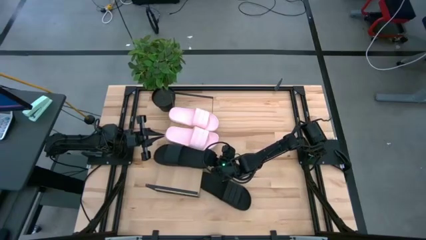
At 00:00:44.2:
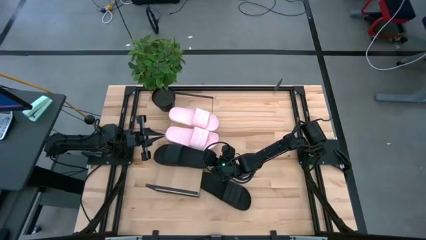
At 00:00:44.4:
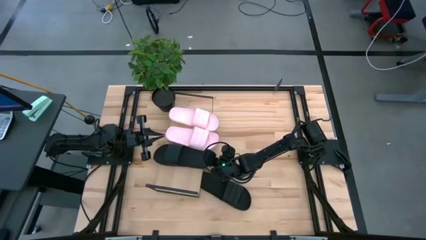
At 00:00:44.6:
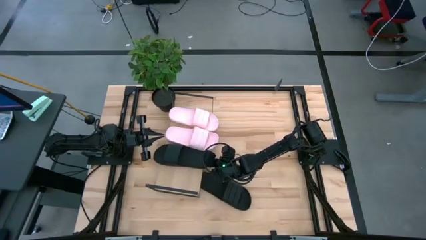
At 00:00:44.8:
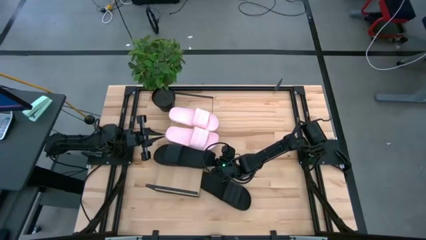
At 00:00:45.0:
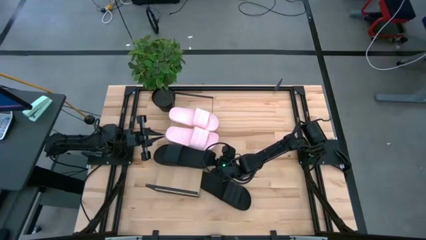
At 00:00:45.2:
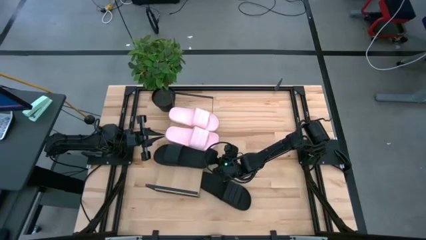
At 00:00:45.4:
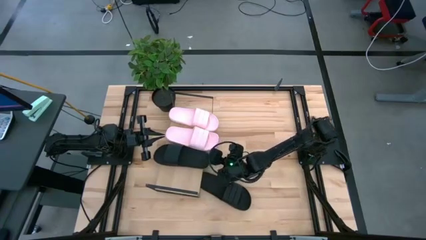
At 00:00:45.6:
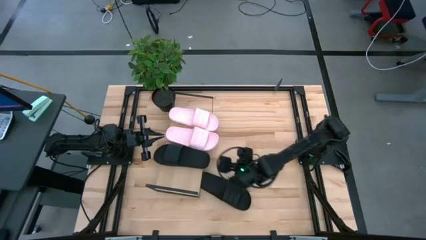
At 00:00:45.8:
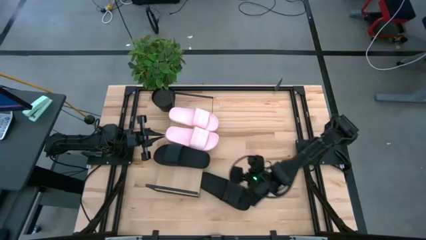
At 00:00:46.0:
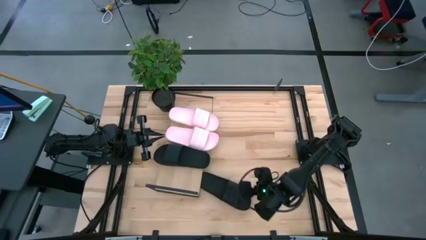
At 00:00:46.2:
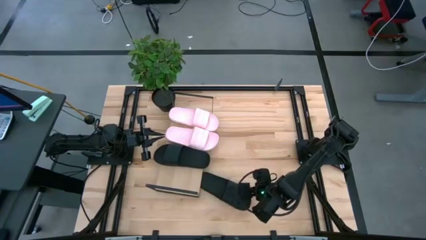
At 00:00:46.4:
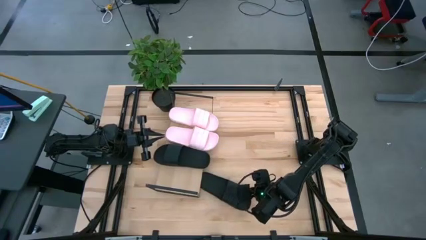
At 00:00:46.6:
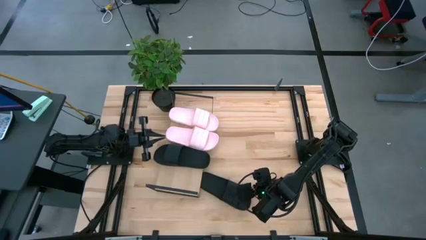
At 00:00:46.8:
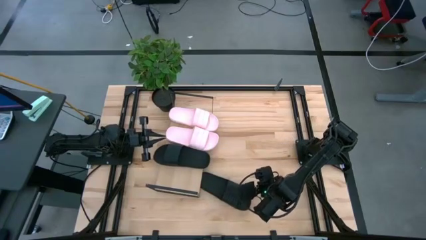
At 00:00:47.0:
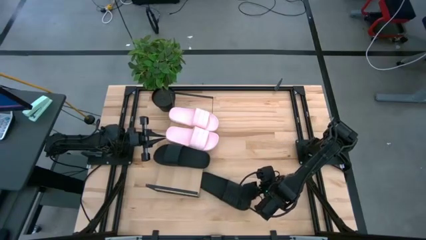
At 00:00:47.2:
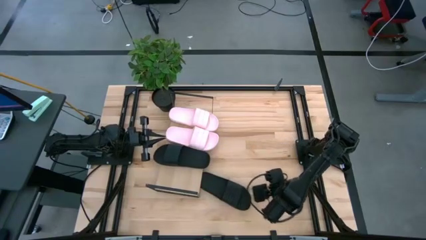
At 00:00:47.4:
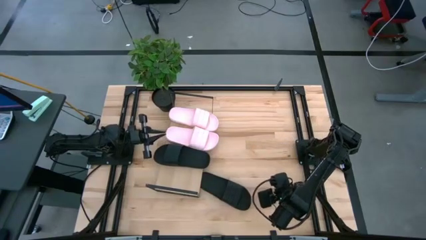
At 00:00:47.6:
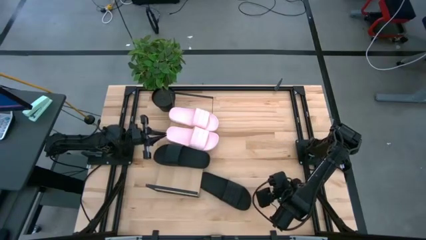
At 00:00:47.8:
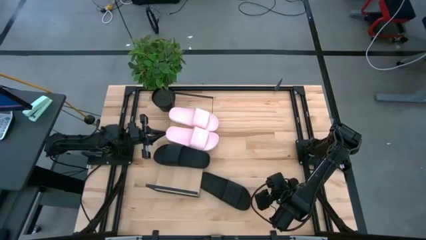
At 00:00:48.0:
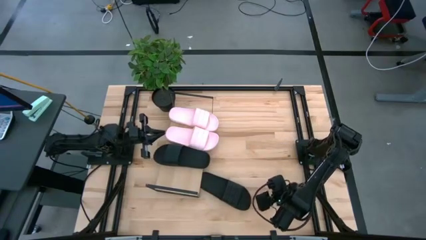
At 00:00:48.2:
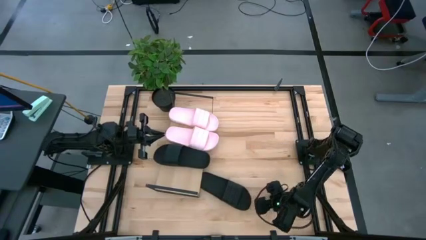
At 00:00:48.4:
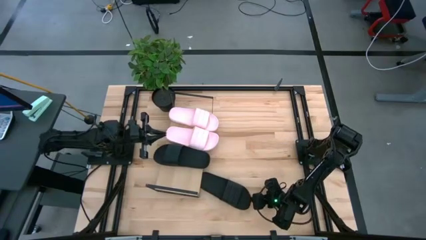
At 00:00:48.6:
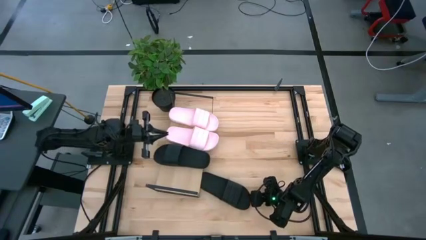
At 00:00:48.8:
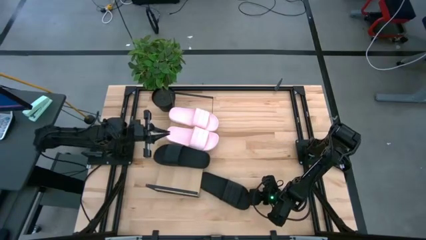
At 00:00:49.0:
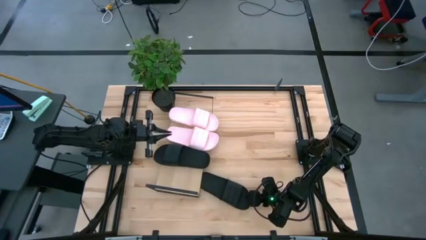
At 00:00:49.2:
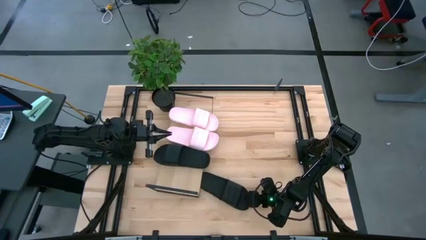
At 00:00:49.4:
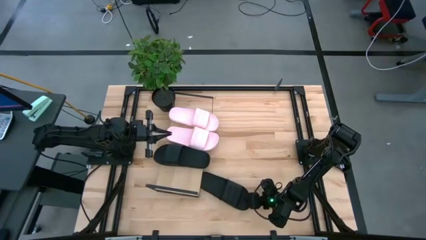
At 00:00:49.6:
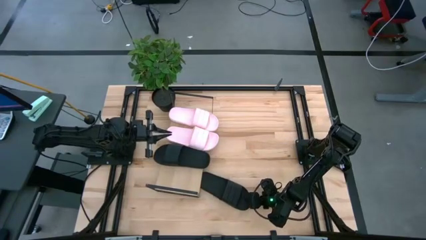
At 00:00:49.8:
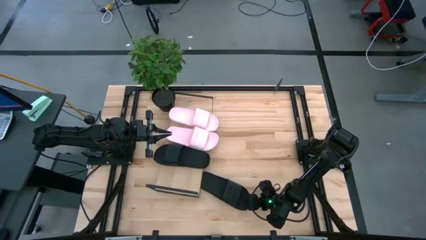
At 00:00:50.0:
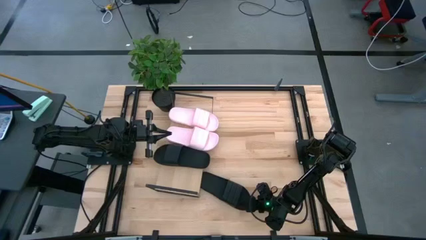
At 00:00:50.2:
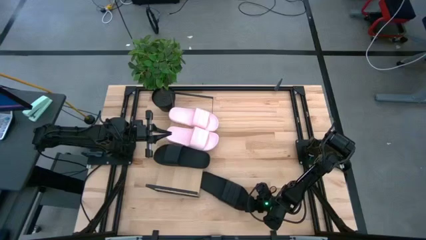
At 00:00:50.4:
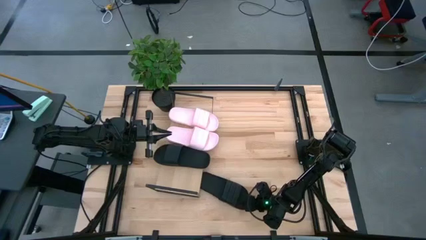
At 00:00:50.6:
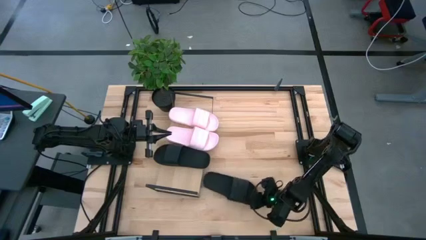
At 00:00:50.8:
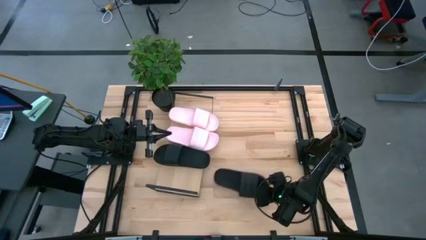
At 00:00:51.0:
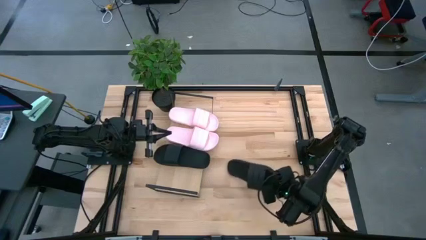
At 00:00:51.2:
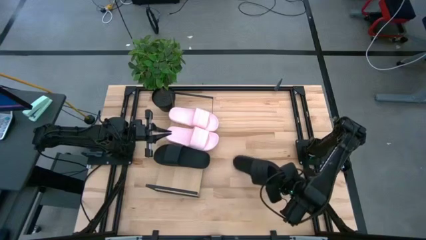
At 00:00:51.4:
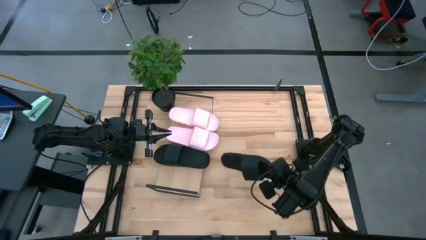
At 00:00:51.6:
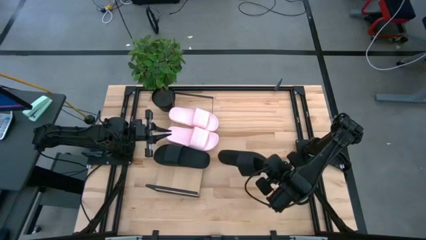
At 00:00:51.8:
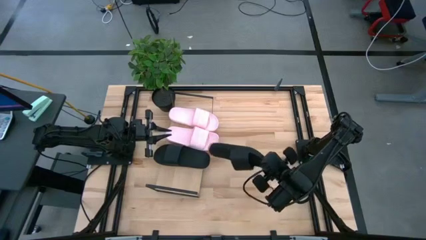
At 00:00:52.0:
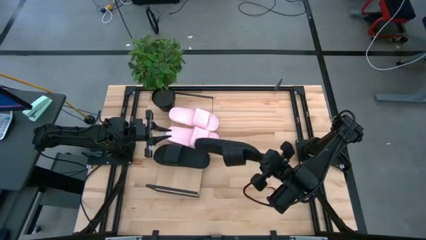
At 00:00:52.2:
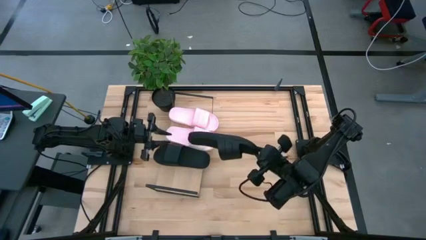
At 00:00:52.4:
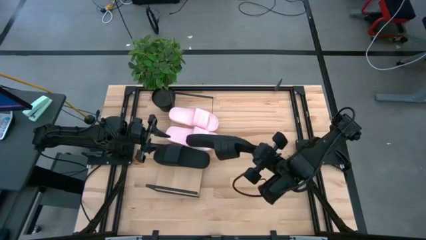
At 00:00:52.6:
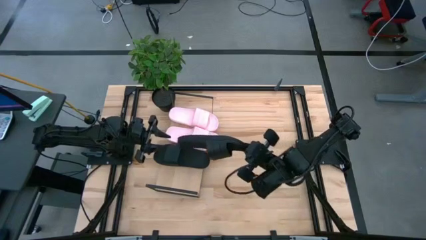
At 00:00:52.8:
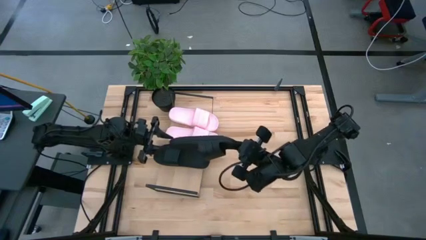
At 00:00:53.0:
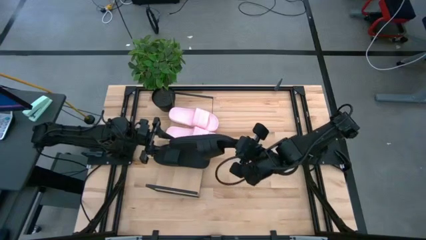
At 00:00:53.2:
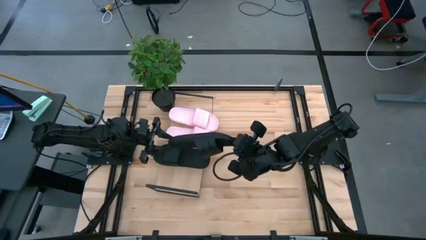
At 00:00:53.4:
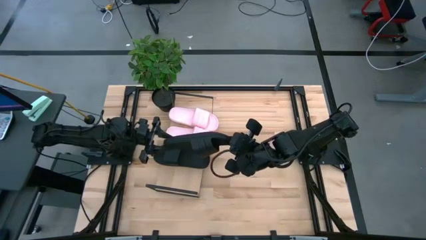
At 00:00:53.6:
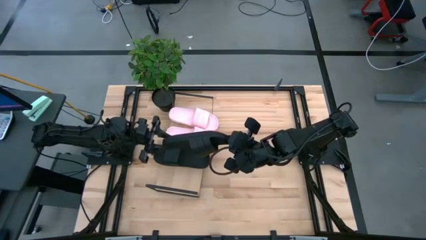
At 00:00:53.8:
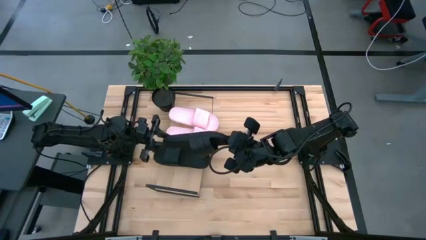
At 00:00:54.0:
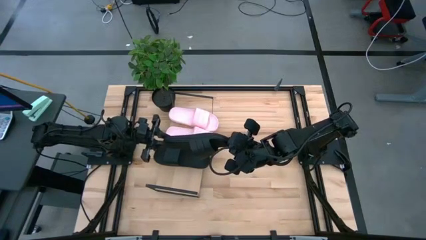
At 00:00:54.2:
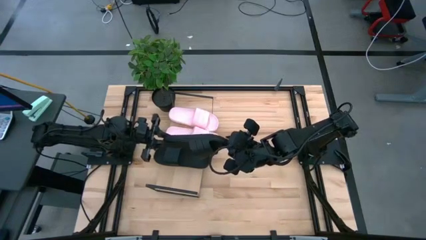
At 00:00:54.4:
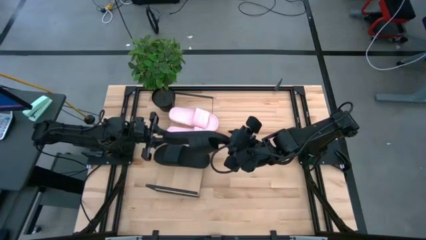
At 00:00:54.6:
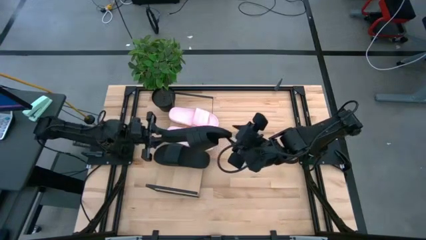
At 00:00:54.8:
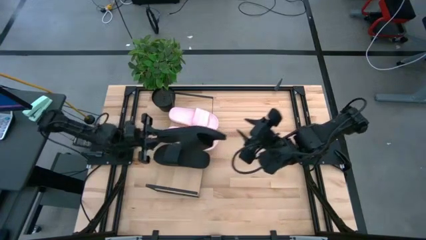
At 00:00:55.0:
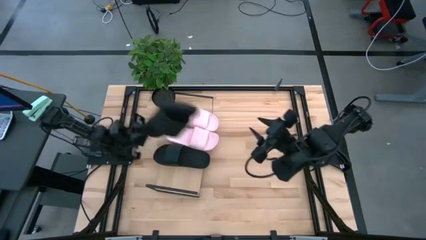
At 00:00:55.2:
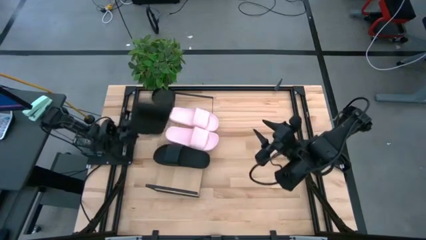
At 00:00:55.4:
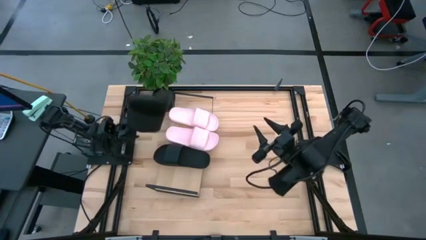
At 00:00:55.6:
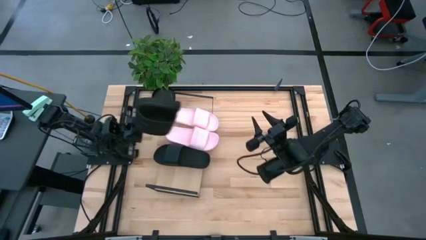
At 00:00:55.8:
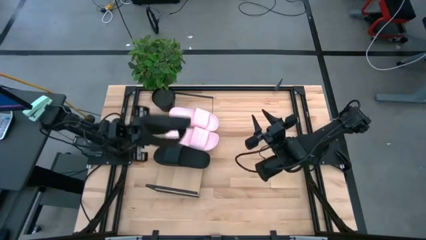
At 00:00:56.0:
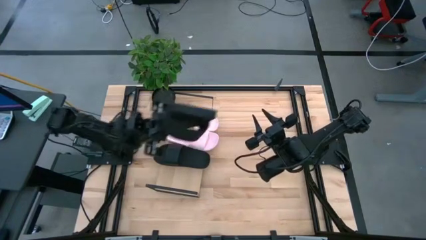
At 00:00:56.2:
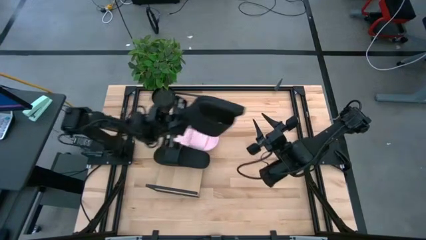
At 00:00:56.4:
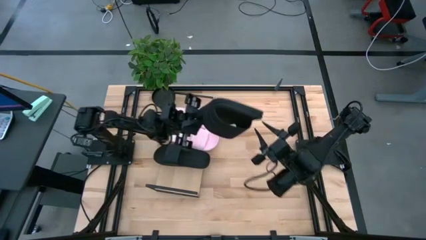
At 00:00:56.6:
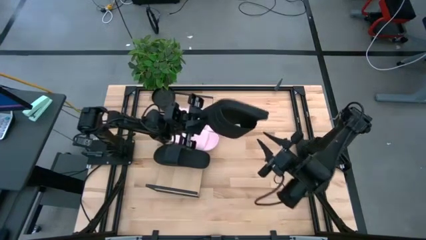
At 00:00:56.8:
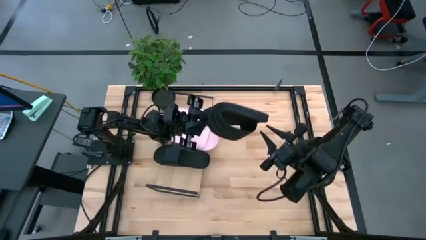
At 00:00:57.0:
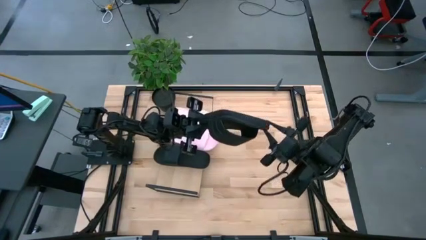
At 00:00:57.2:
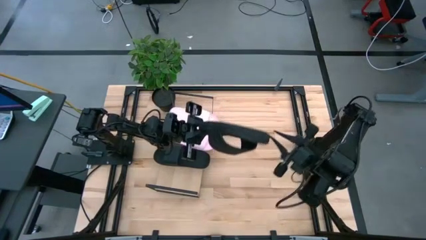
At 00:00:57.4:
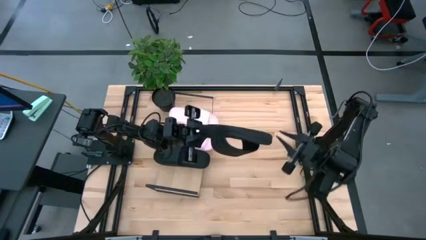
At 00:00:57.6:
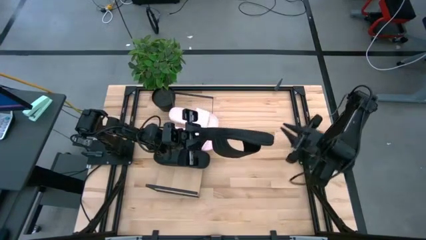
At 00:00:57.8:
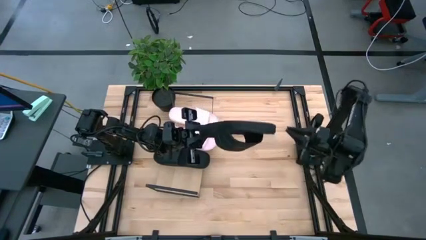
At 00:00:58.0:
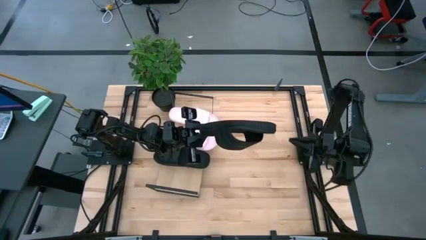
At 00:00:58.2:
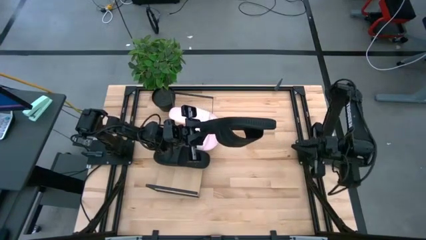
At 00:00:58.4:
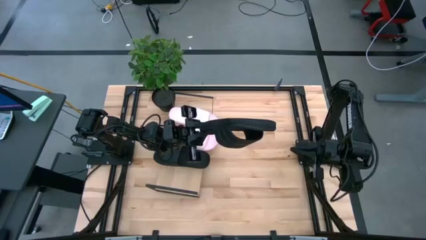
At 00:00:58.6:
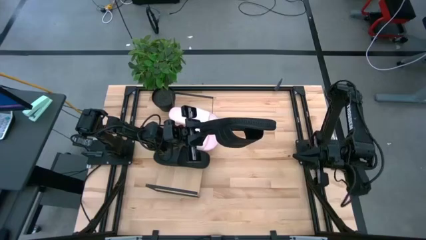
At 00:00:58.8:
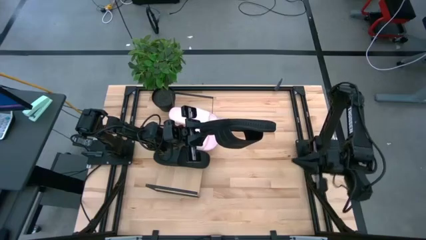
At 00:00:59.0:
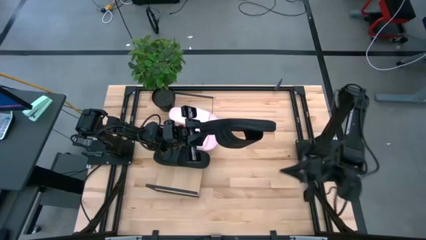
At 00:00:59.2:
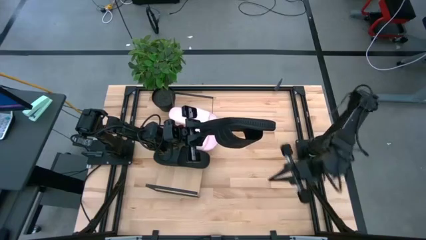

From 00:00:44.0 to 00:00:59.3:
Task: Pick and place slides into the shelf
Put the black slipper on the shelf
